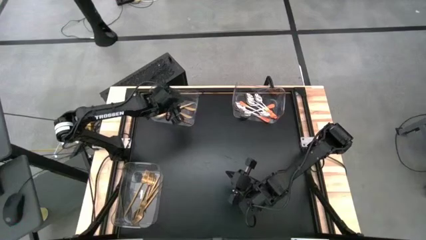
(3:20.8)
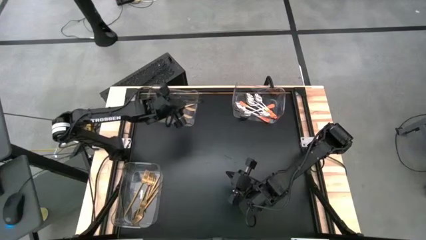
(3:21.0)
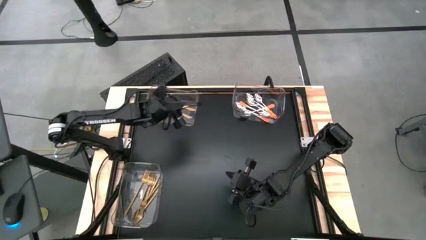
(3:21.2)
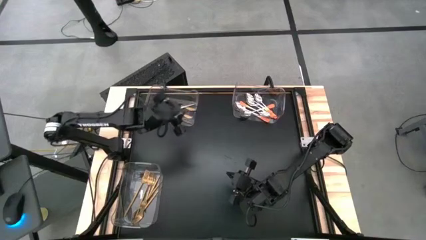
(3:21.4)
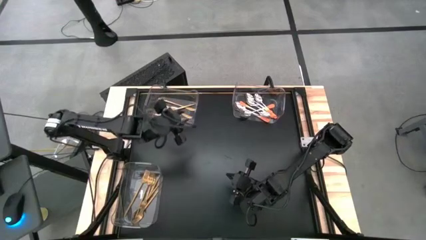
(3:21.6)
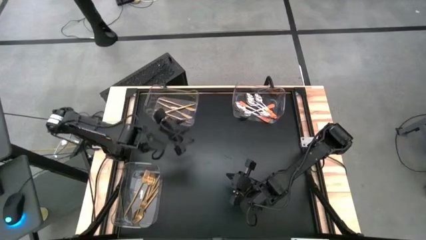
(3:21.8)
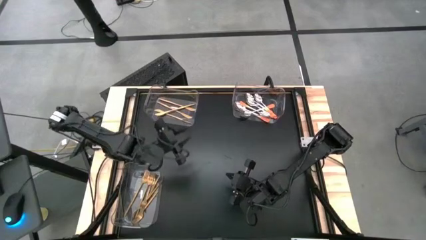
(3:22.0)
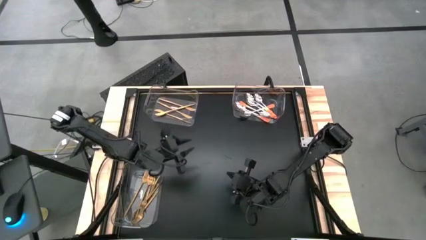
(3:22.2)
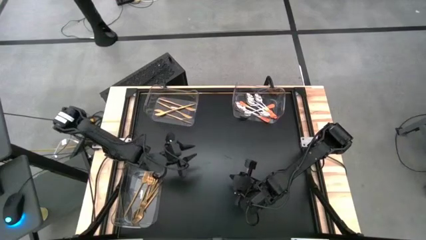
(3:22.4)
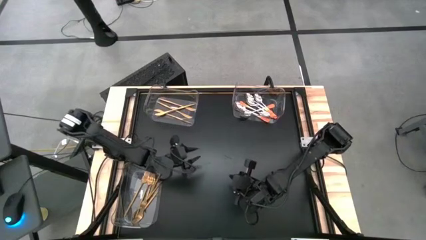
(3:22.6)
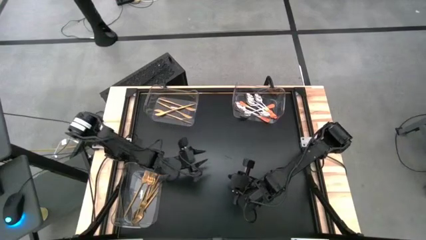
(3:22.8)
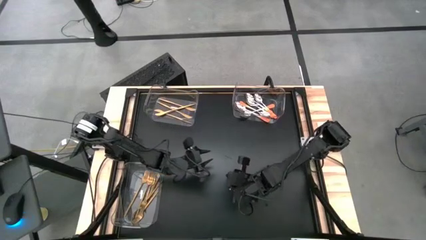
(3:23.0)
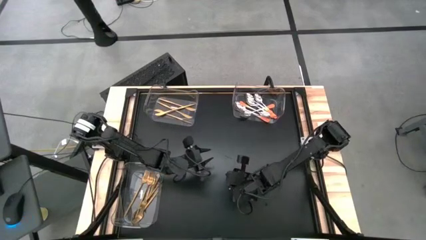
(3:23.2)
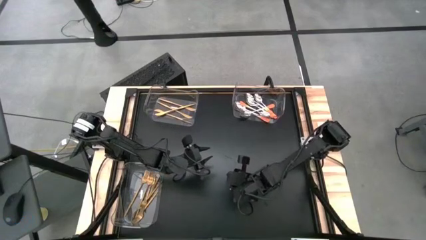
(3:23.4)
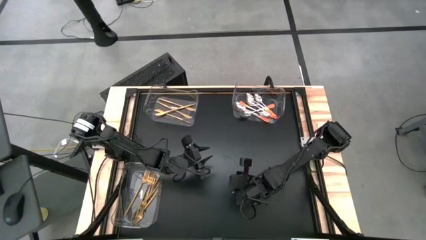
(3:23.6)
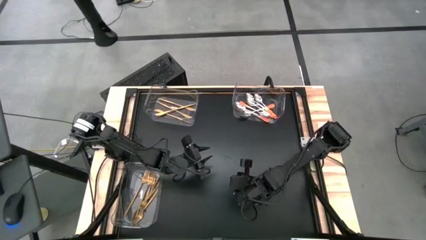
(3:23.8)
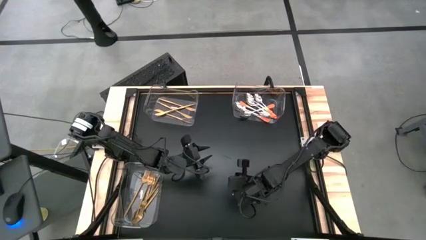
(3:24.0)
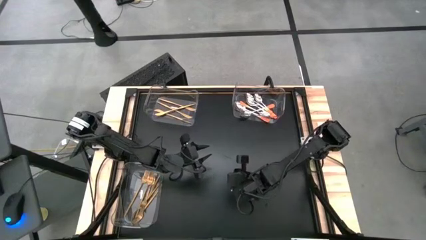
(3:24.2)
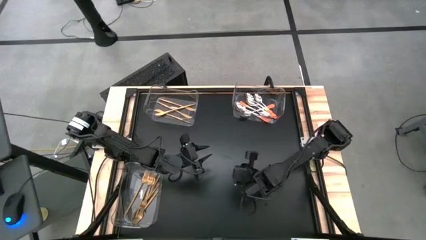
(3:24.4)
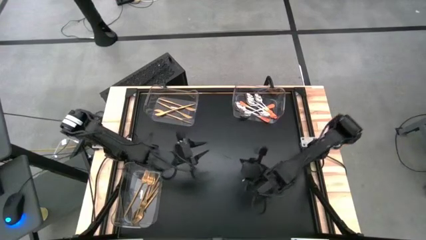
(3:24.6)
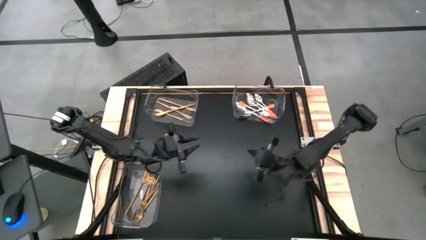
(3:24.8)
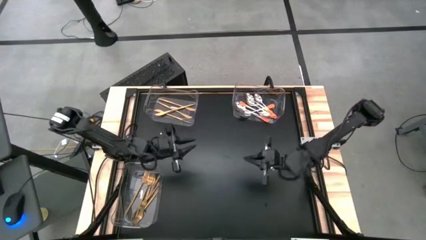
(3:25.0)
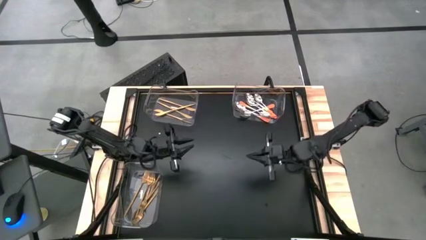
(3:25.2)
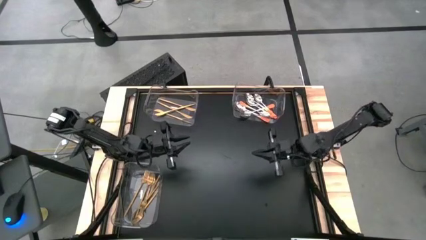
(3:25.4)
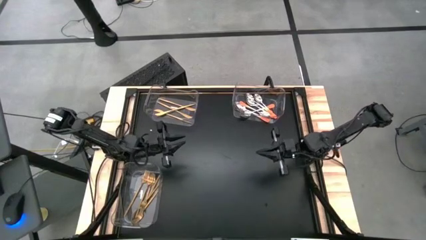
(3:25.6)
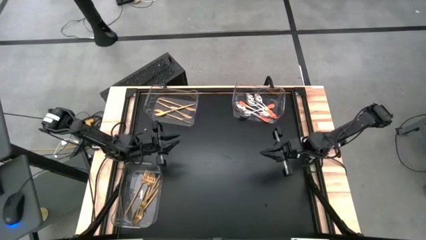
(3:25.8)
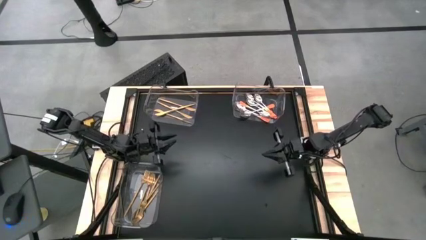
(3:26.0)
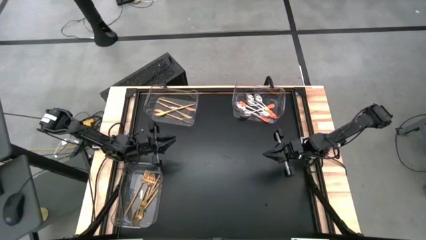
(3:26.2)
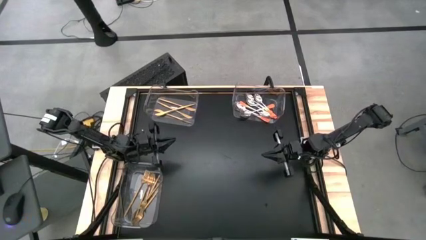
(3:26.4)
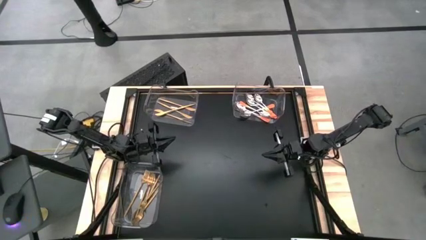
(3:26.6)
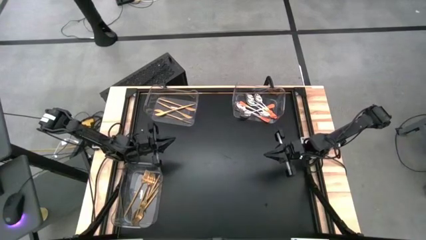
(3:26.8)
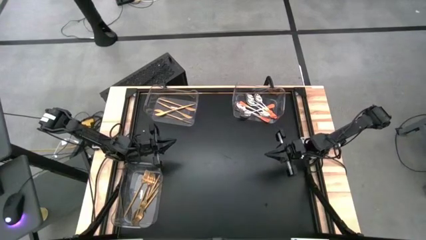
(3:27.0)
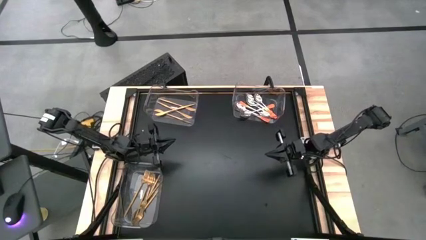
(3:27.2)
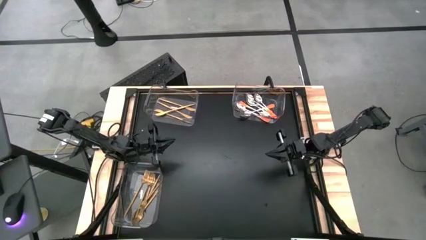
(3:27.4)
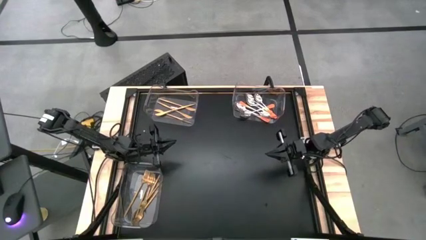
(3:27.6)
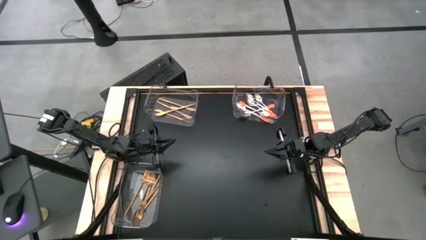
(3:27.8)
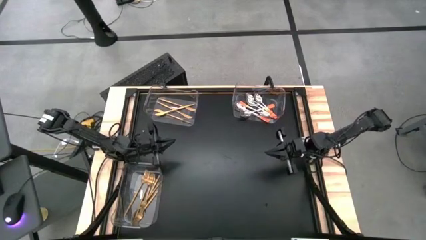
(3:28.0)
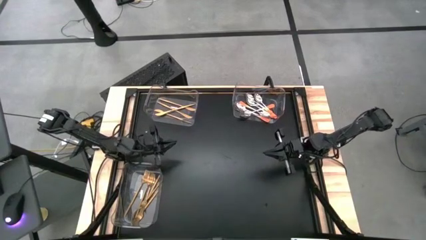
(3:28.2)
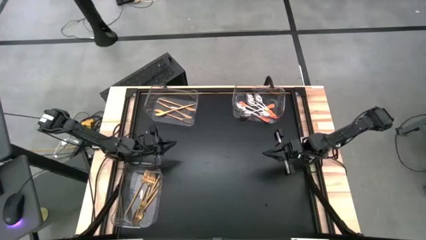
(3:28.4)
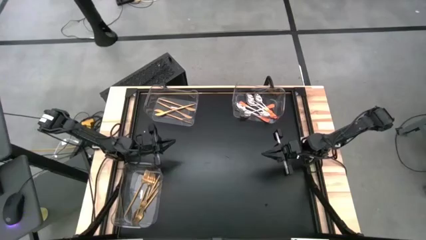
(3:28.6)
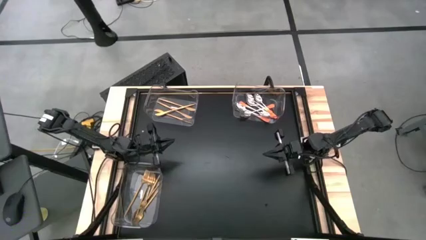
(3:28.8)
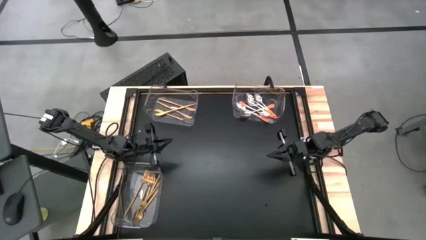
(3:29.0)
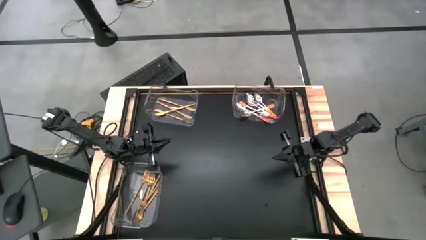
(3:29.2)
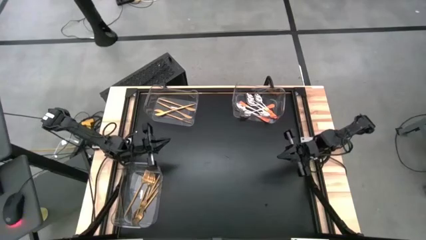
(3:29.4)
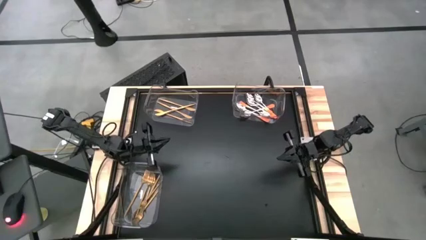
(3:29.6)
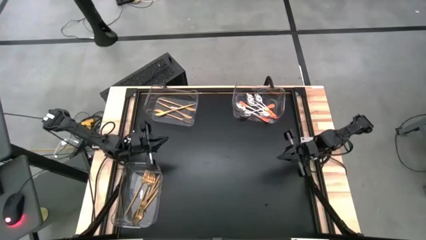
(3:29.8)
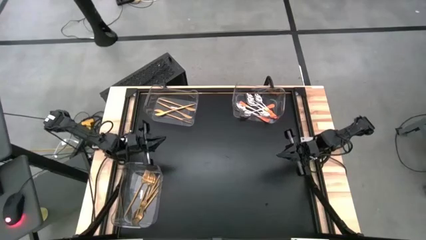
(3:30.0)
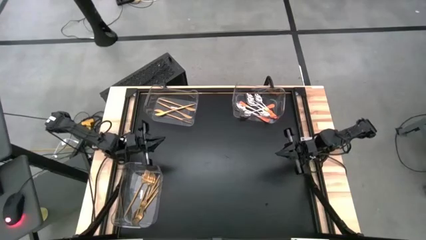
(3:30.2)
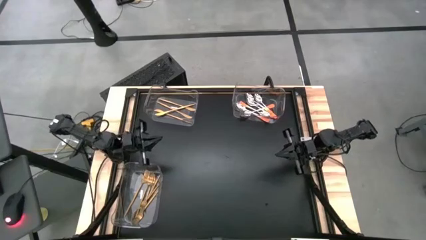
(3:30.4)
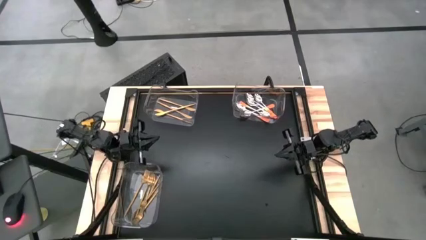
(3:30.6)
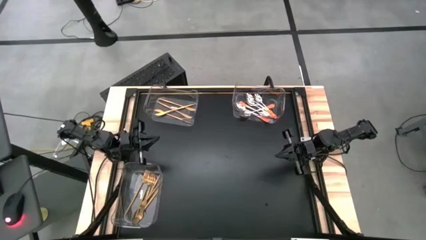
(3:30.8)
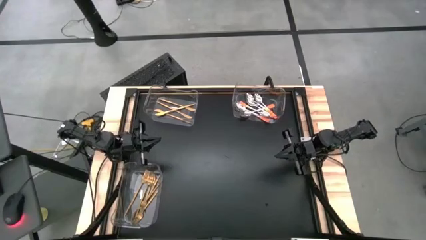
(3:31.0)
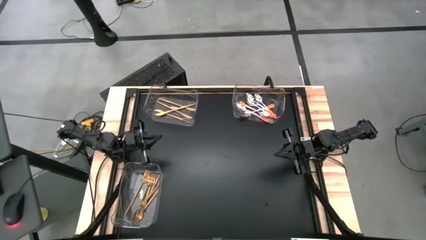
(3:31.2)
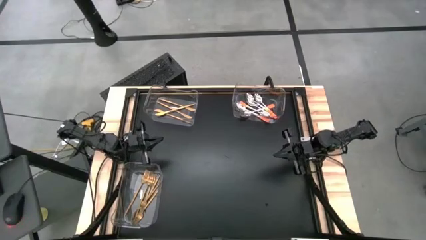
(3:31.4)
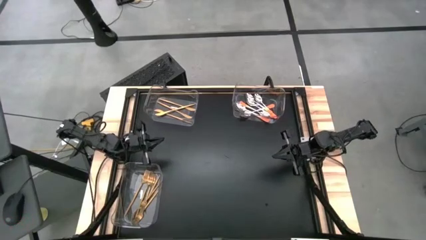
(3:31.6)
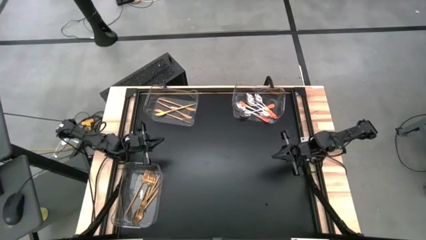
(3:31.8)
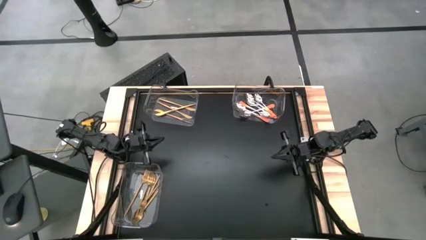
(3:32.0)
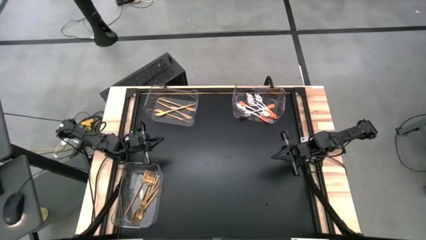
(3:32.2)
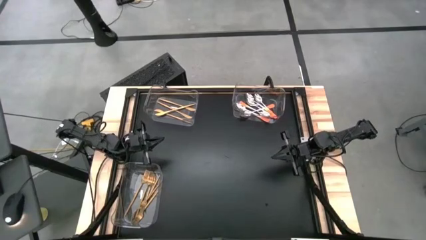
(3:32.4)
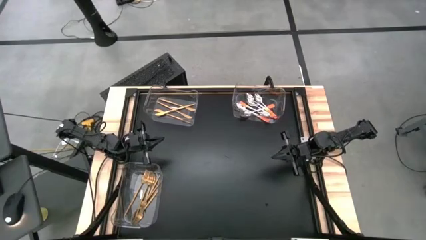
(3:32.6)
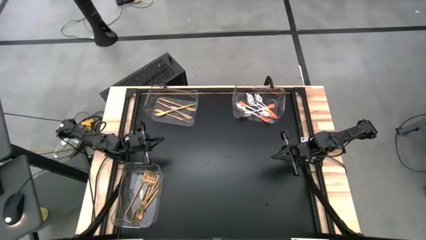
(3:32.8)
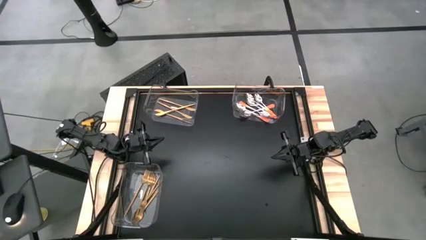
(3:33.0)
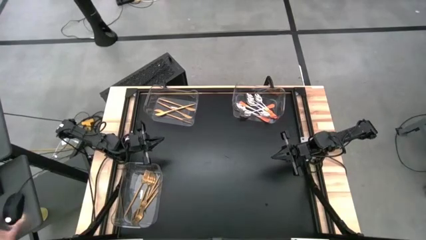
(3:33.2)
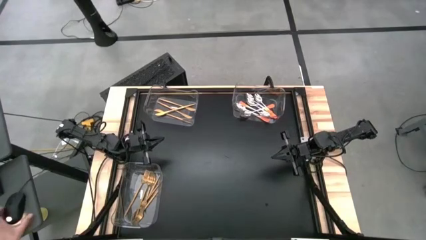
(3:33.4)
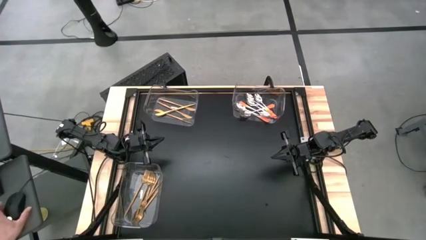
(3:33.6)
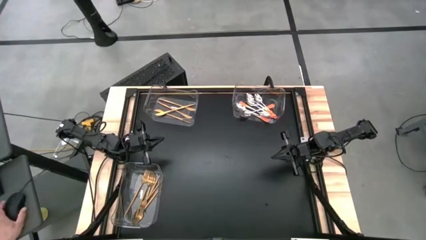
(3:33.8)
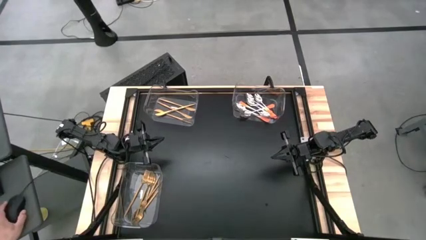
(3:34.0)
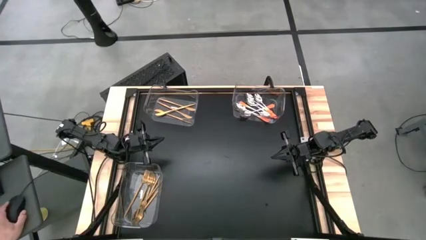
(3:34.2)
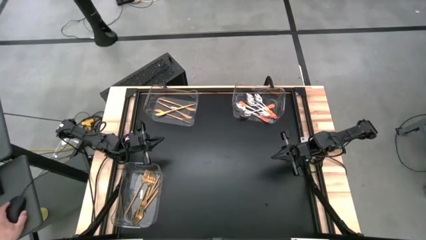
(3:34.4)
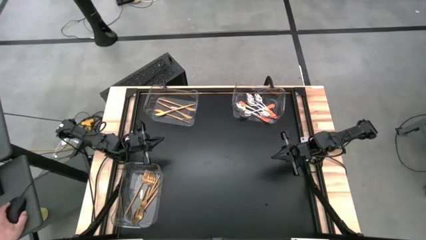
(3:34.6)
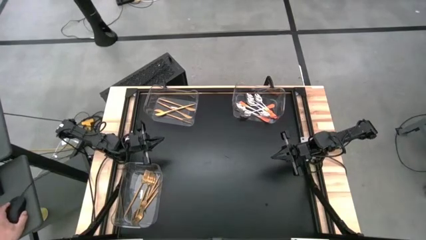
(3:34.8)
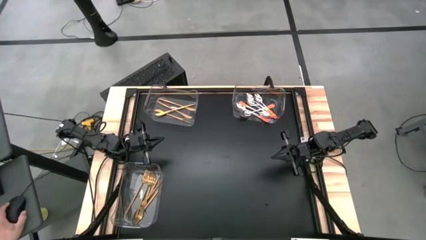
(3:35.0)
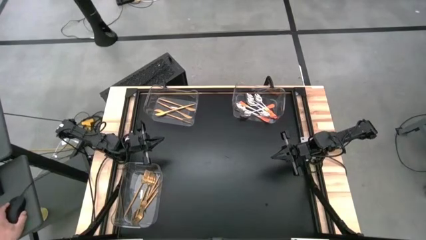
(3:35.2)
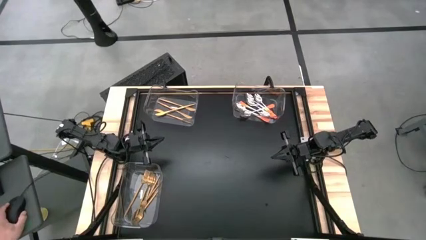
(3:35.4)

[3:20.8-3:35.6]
Task: Sort silverware by color (type)
Return to Home Position
